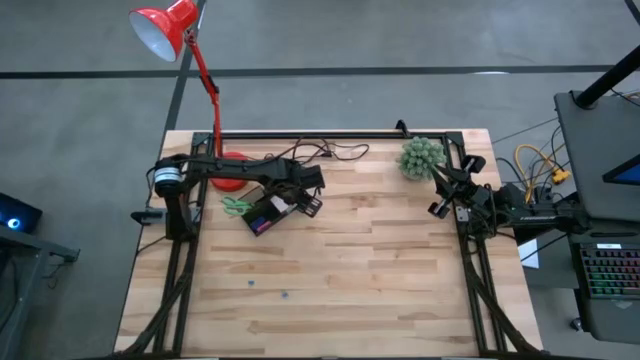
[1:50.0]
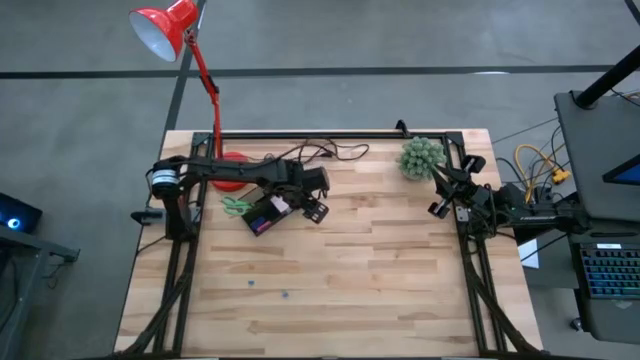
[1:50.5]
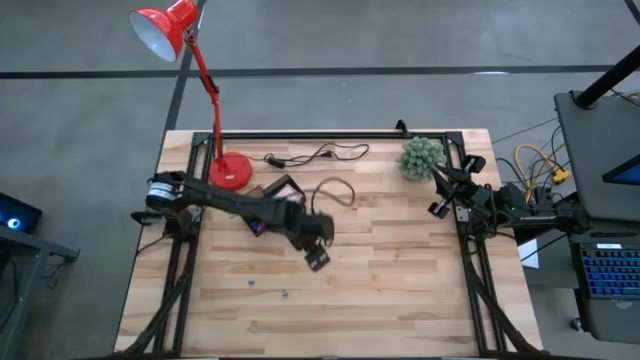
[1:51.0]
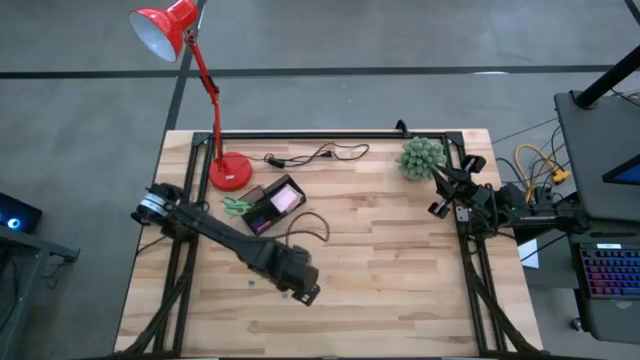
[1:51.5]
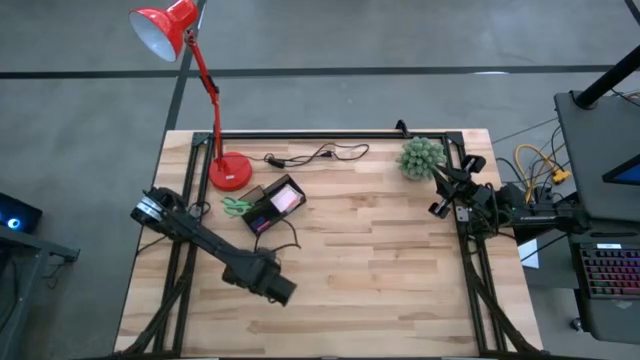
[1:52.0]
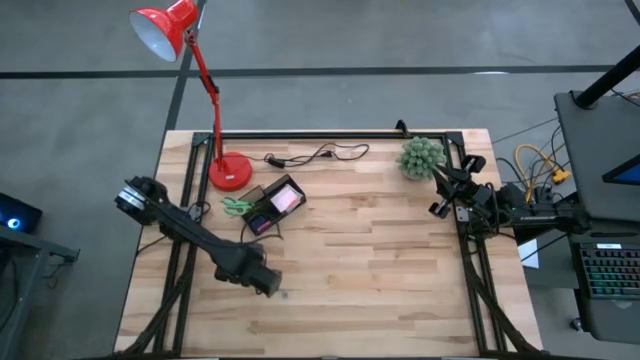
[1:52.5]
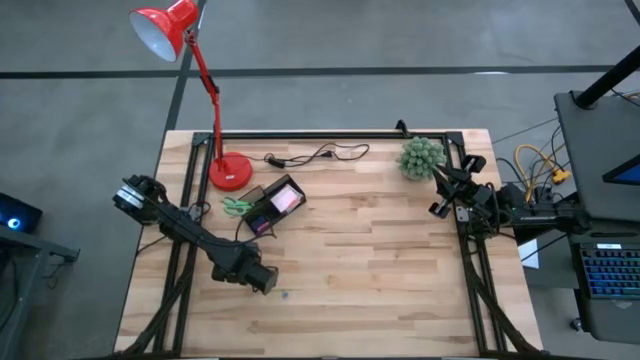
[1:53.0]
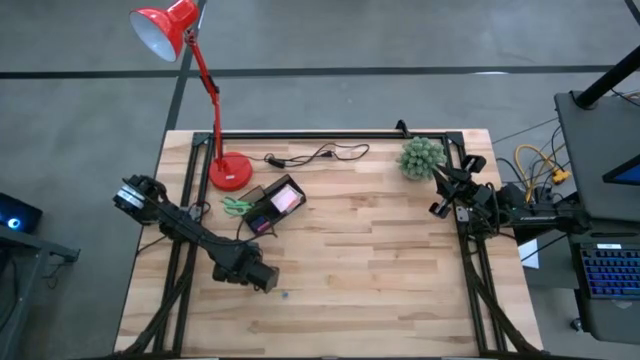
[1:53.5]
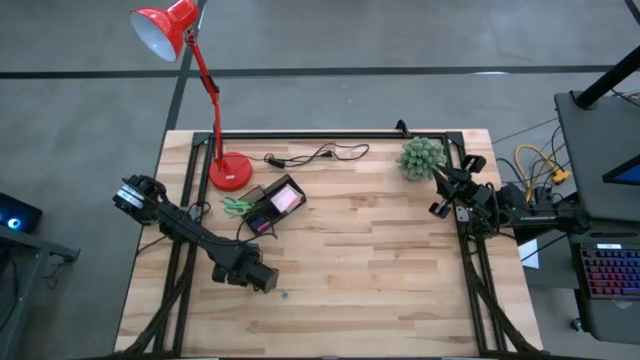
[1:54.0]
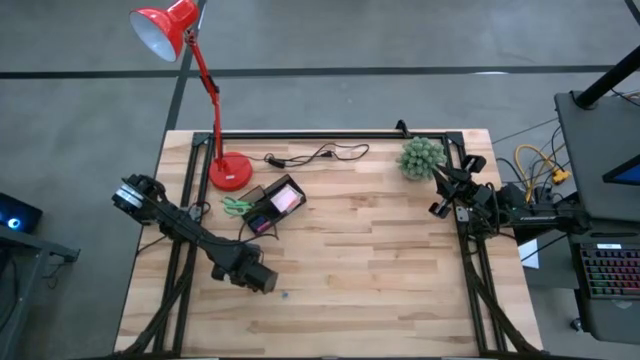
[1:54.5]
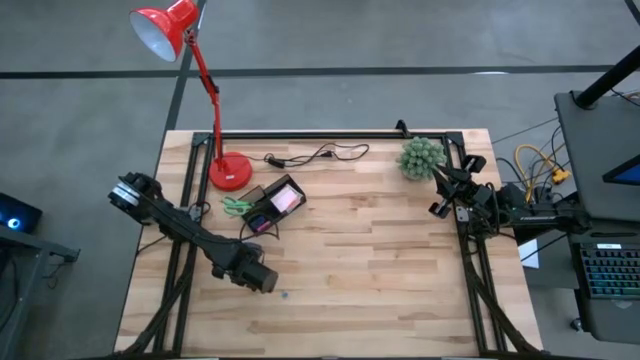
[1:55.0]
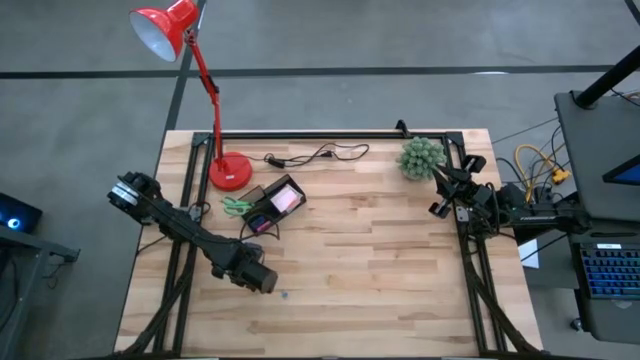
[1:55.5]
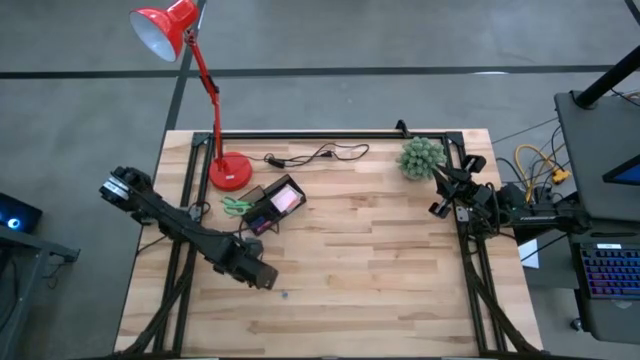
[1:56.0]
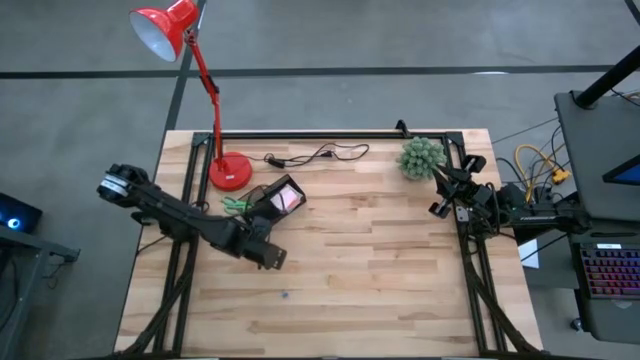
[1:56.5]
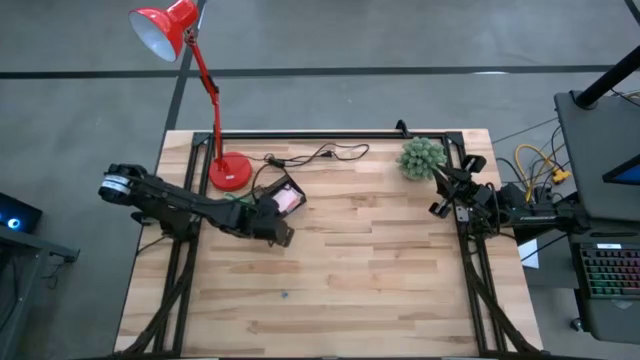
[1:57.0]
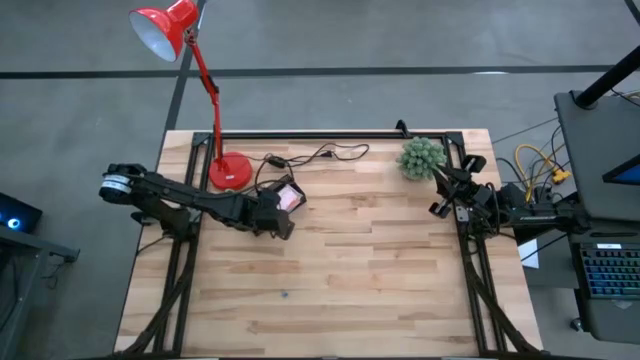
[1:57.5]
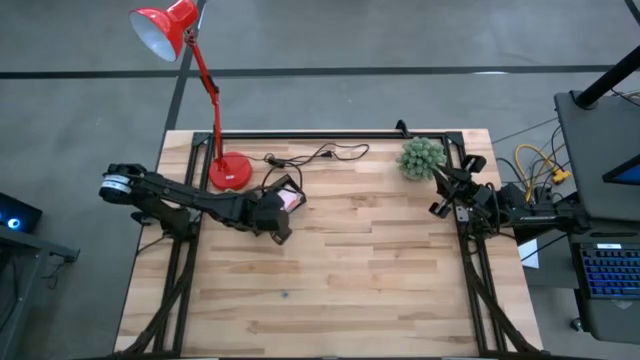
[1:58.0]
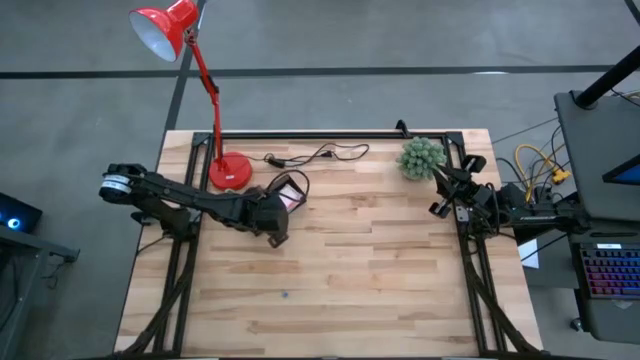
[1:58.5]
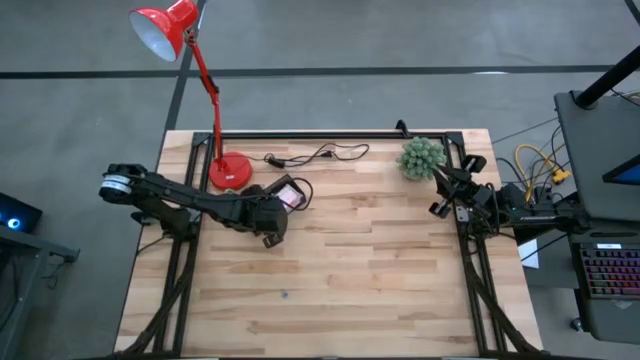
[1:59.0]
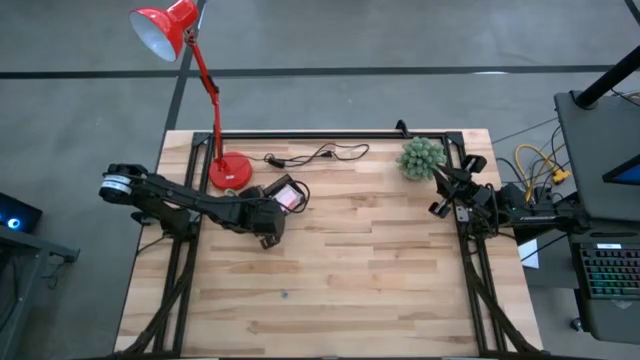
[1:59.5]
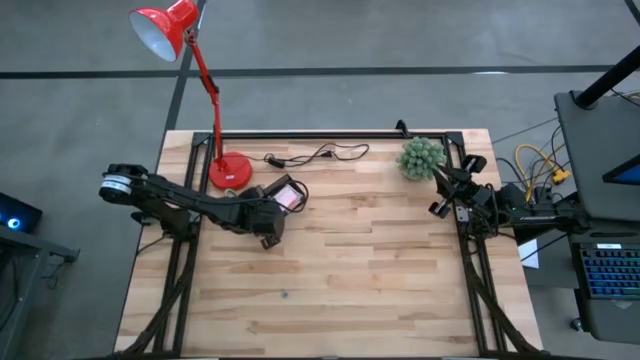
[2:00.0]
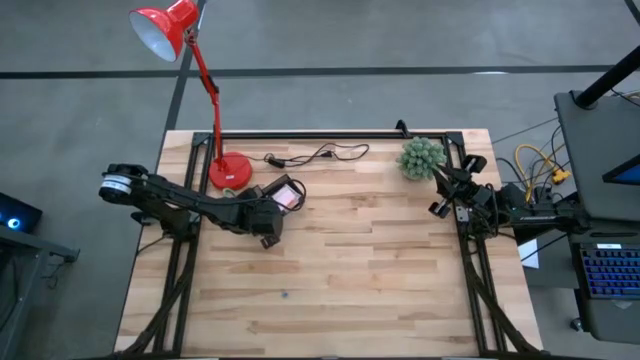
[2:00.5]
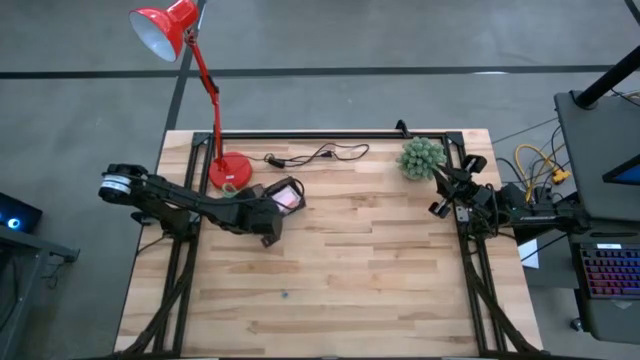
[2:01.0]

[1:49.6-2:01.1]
Task: Pick and place office supplies into organizer
Put the left blue binder clip into the desk organizer

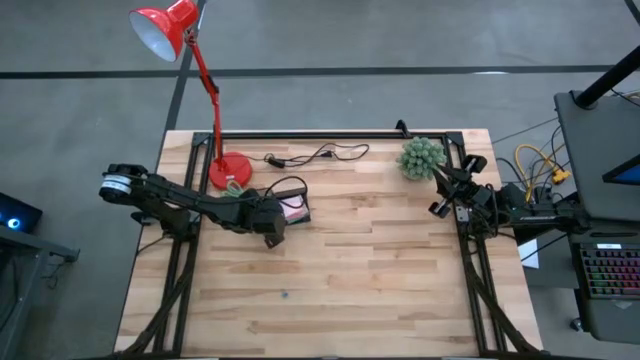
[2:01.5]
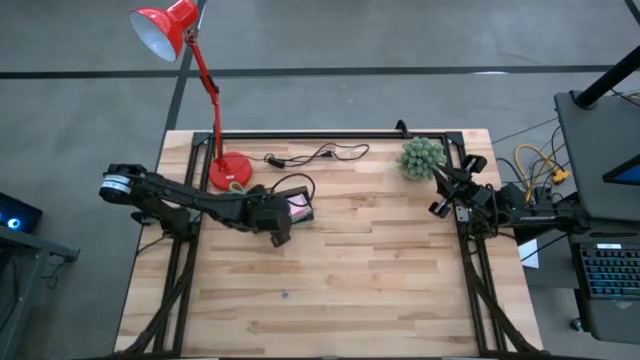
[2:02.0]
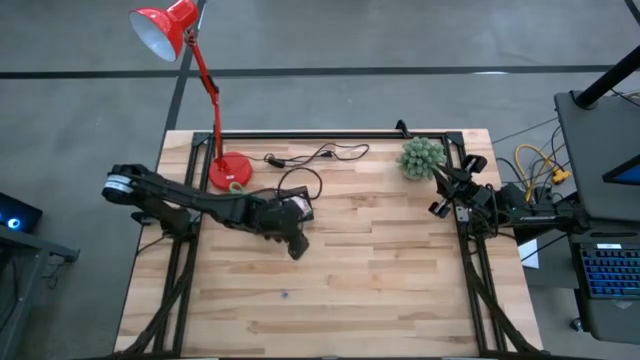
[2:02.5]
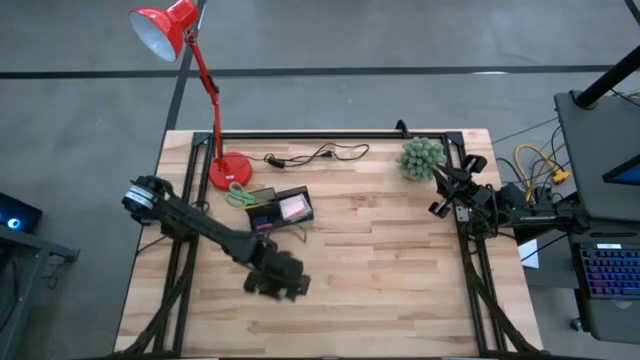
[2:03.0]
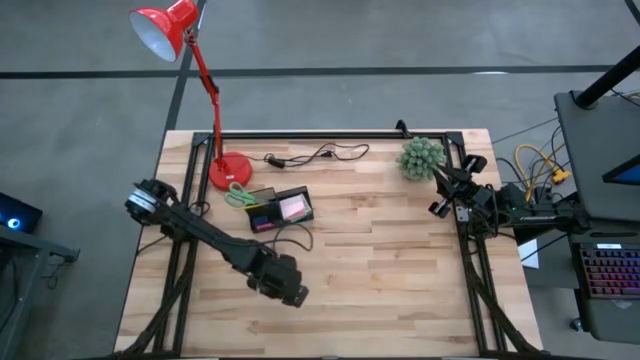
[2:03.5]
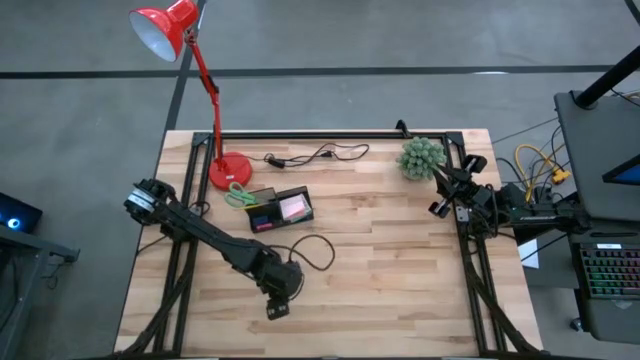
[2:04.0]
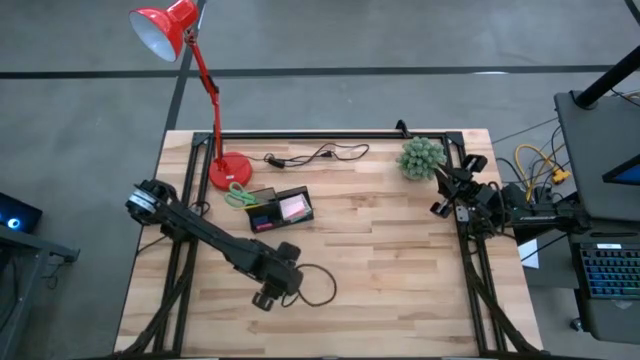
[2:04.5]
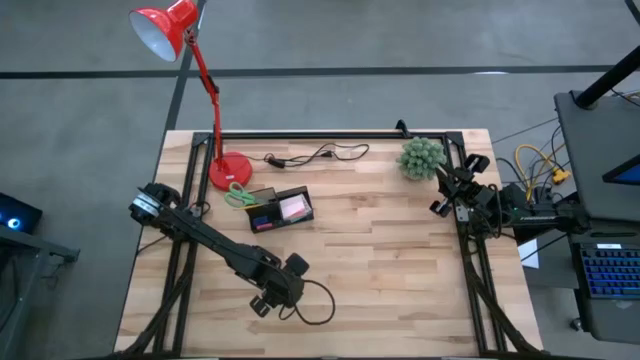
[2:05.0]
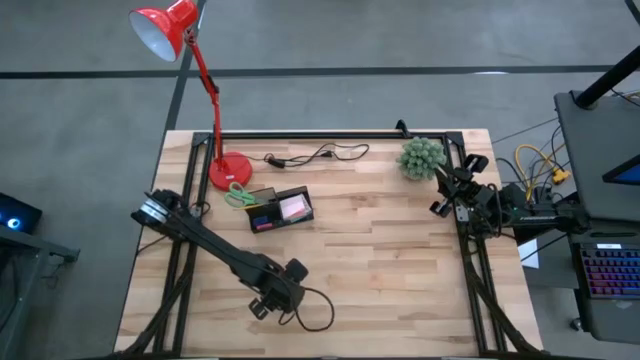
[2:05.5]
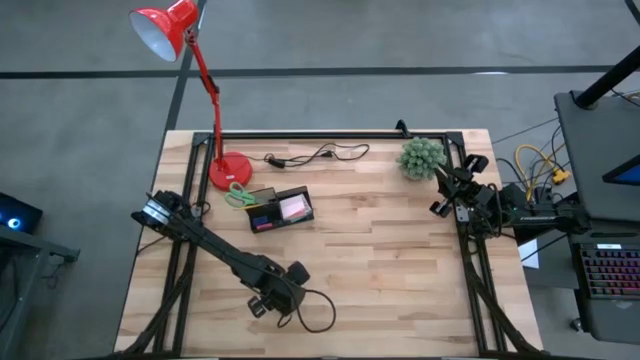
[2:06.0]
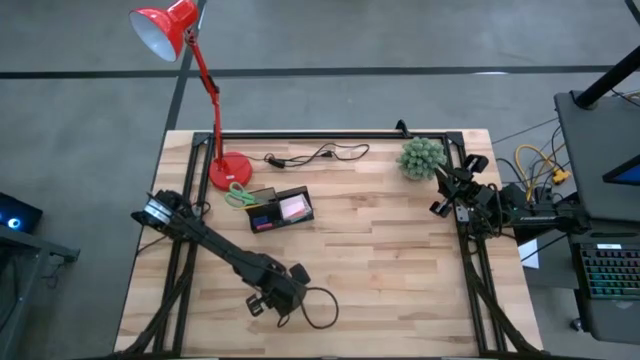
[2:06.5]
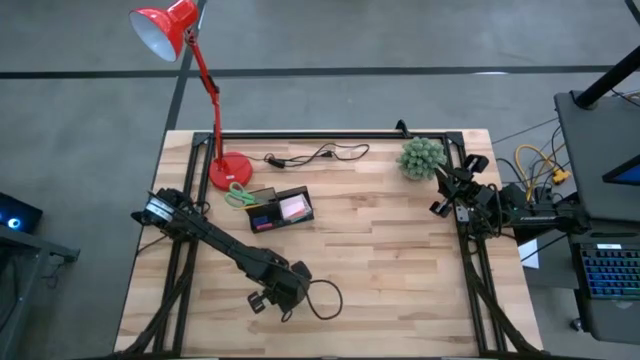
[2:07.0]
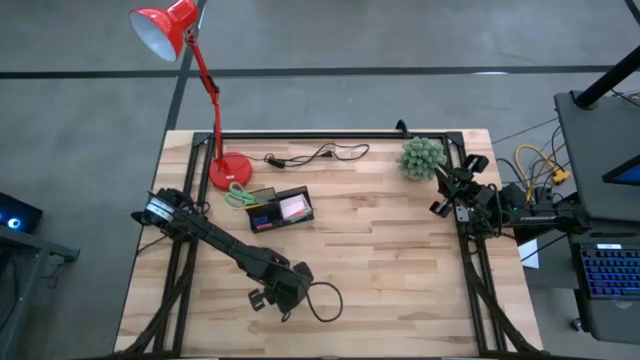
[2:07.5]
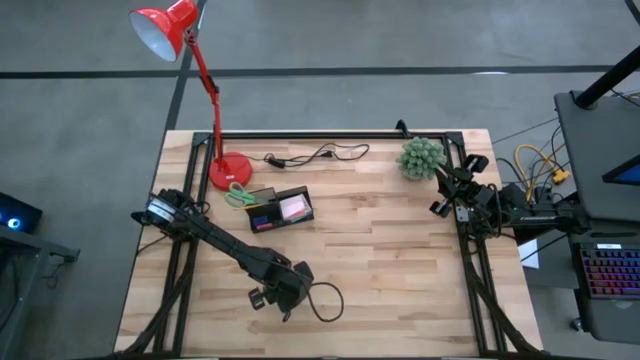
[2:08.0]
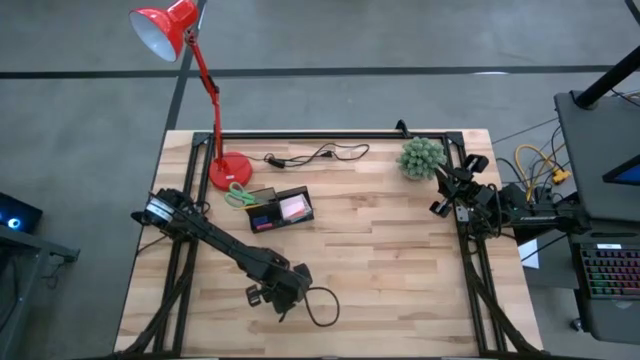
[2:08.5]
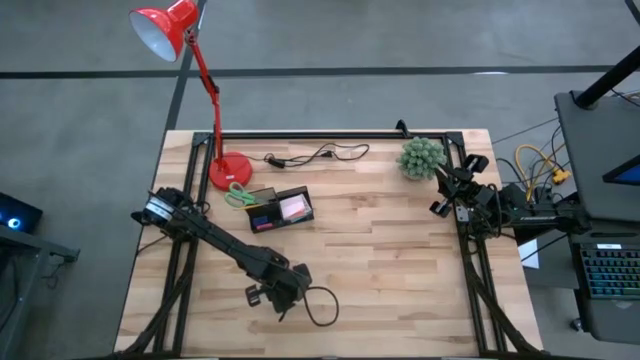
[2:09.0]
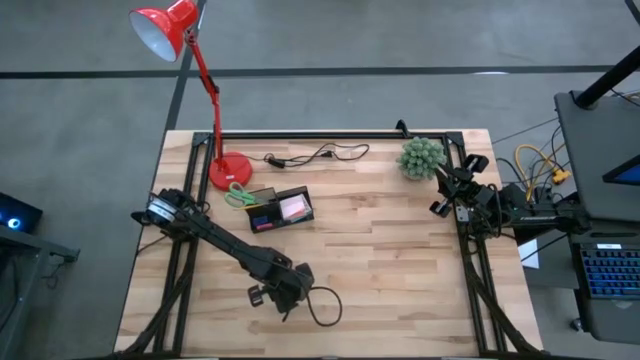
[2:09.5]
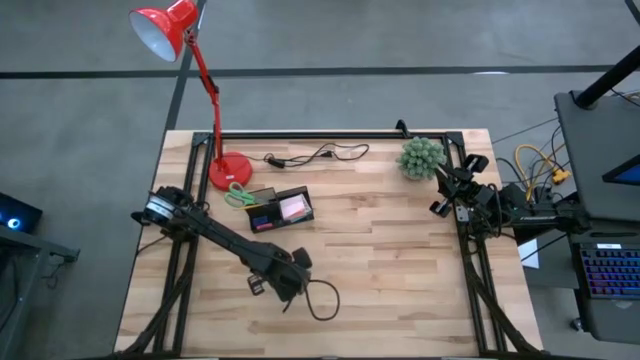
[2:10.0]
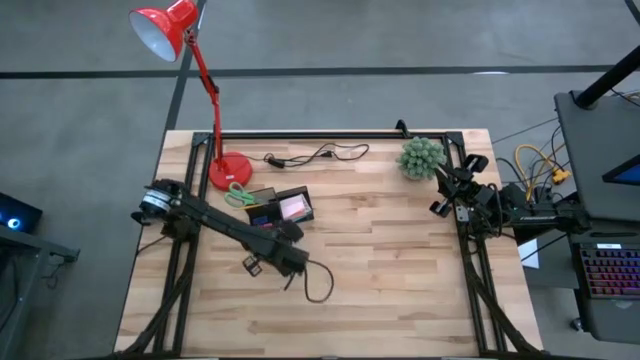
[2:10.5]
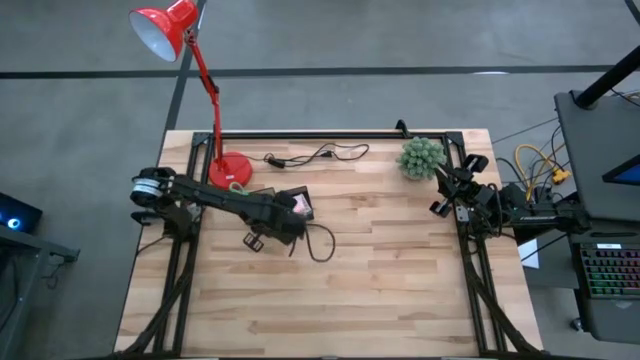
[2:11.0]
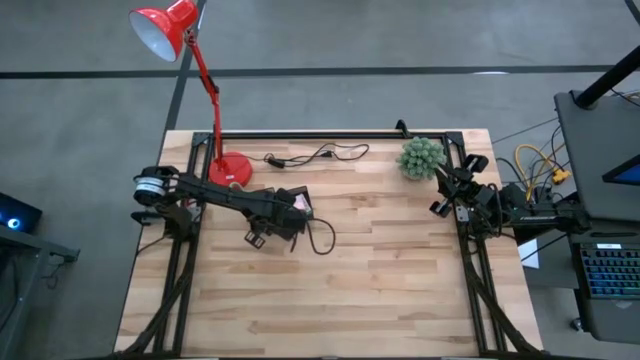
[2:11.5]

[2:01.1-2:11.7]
Put the blue binder clip into the desk organizer

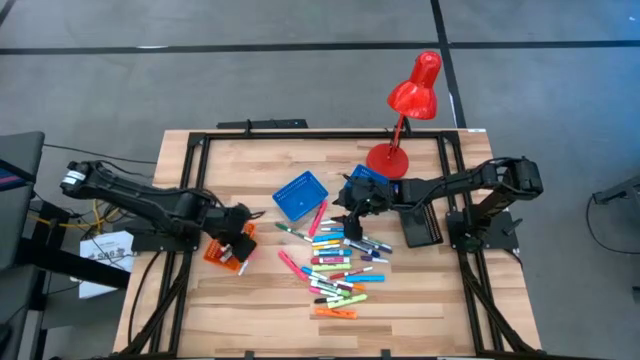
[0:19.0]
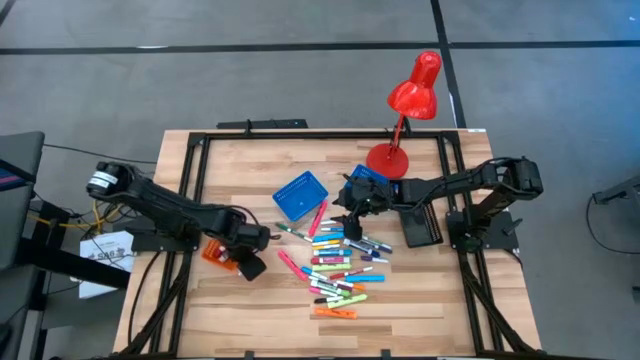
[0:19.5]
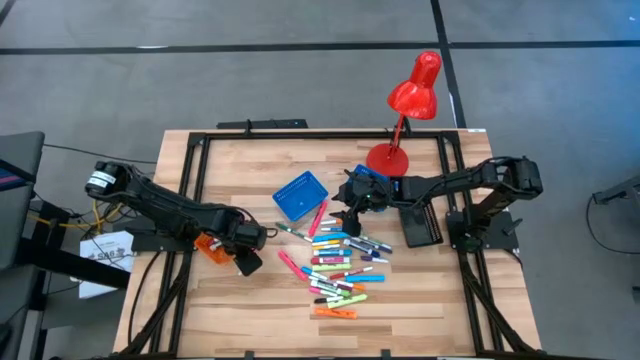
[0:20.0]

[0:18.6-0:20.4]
Task: Pick & Place Markers
Adjust the orange bin
